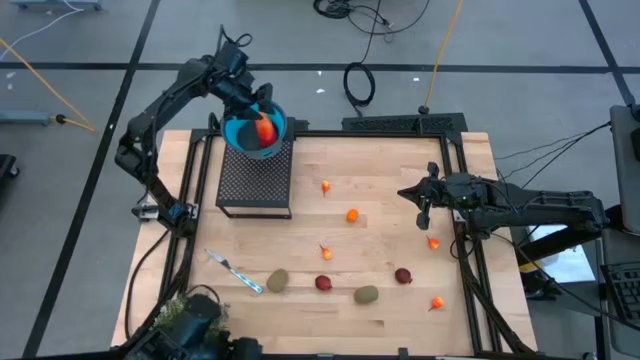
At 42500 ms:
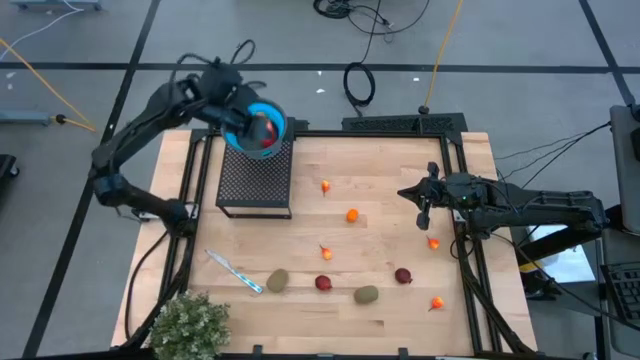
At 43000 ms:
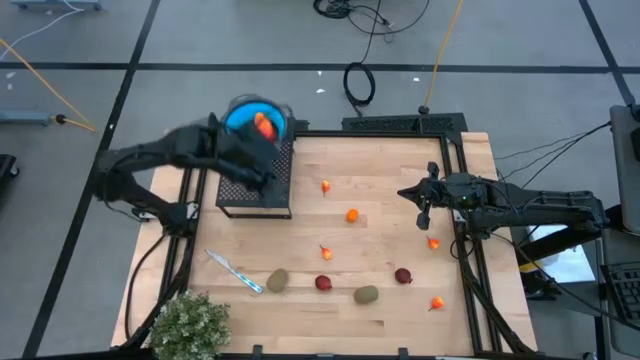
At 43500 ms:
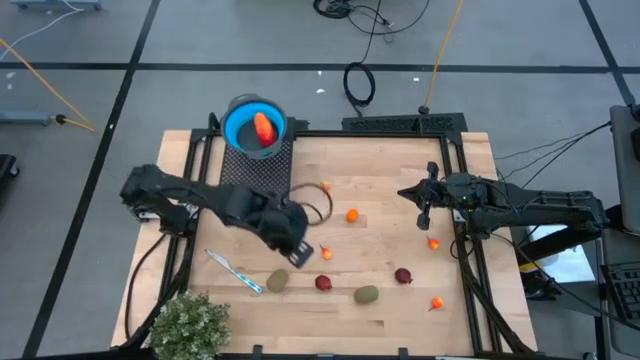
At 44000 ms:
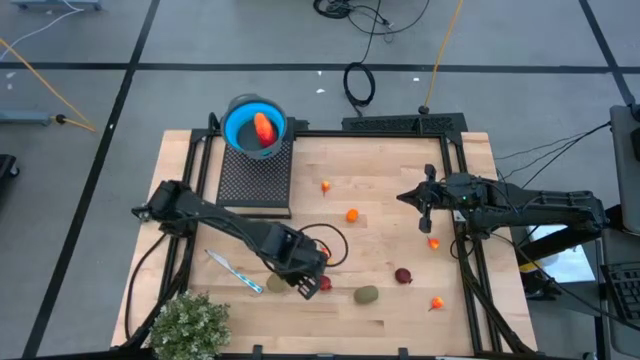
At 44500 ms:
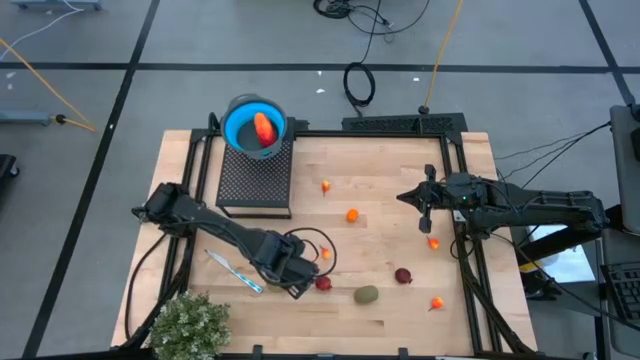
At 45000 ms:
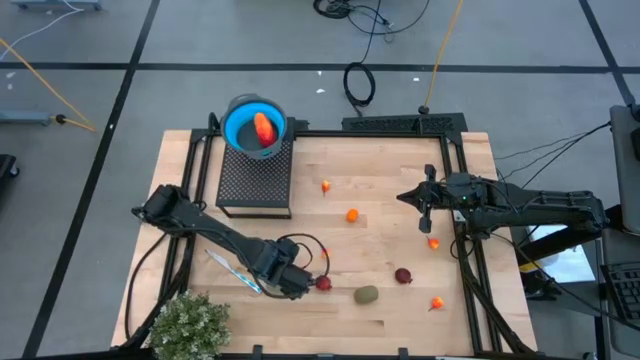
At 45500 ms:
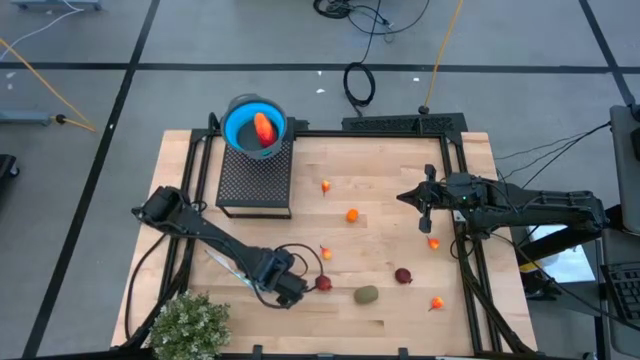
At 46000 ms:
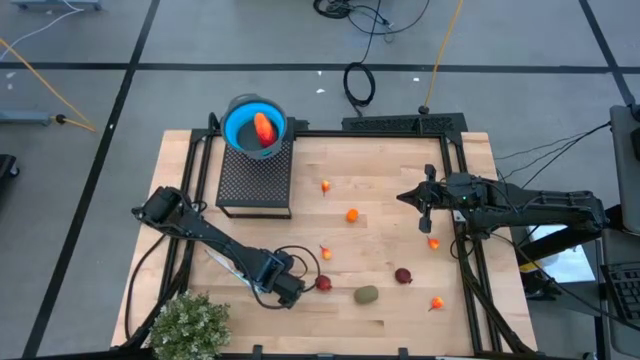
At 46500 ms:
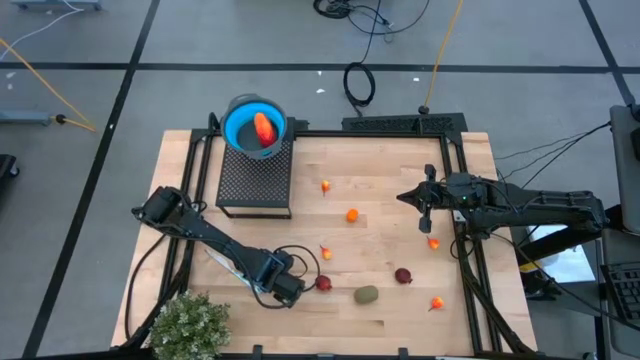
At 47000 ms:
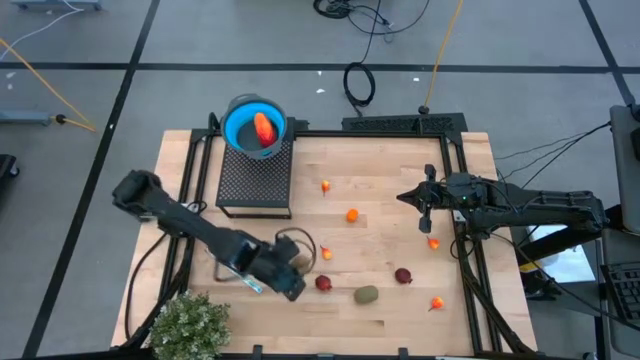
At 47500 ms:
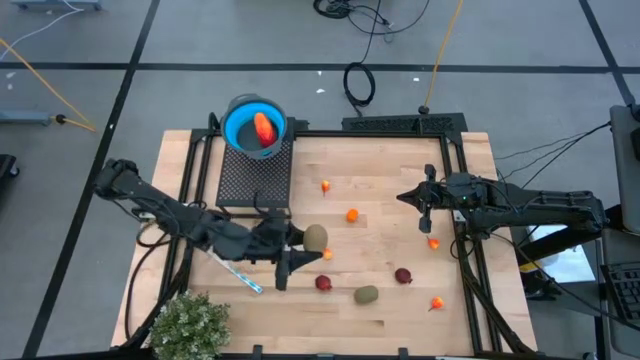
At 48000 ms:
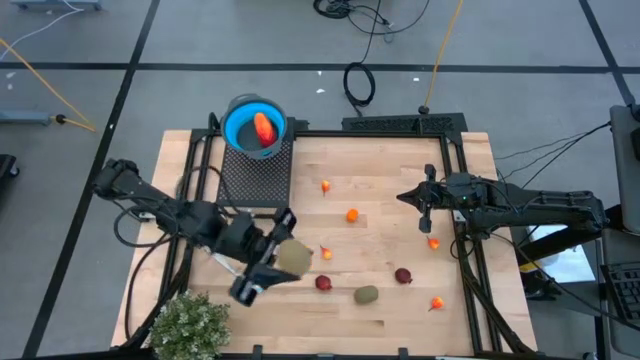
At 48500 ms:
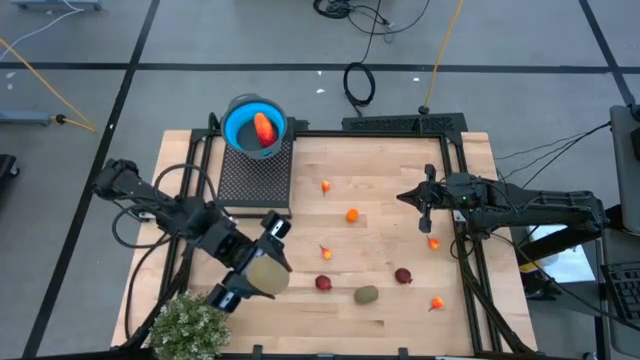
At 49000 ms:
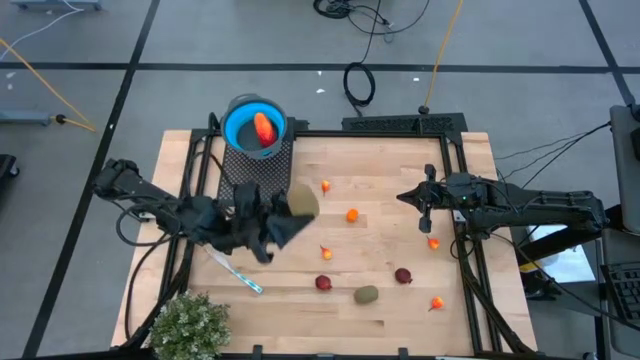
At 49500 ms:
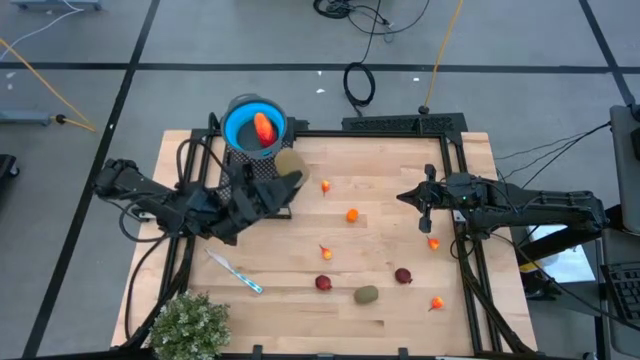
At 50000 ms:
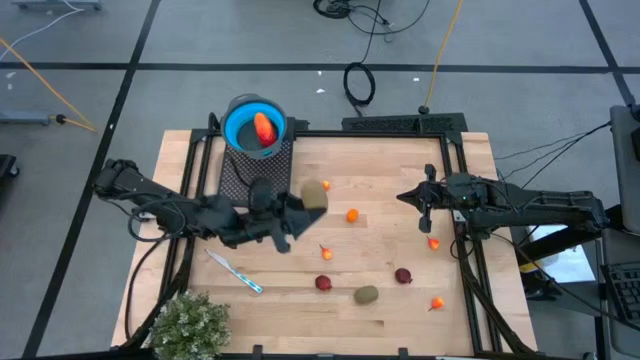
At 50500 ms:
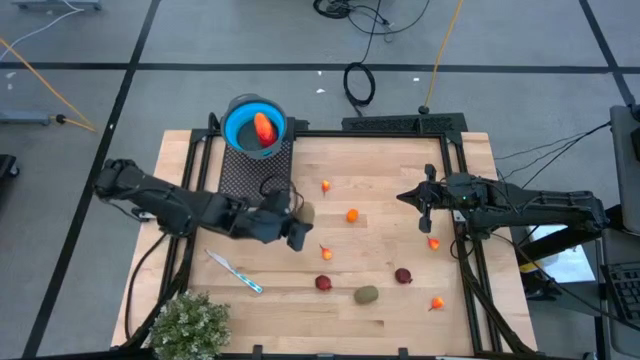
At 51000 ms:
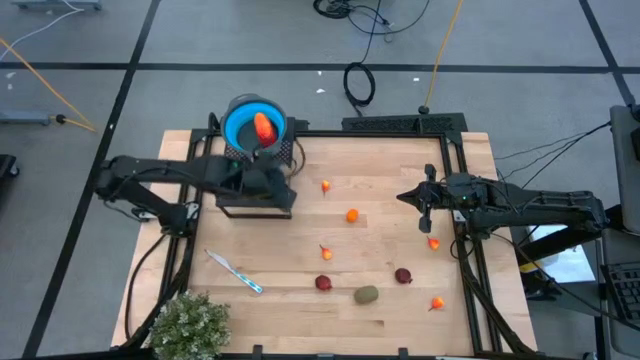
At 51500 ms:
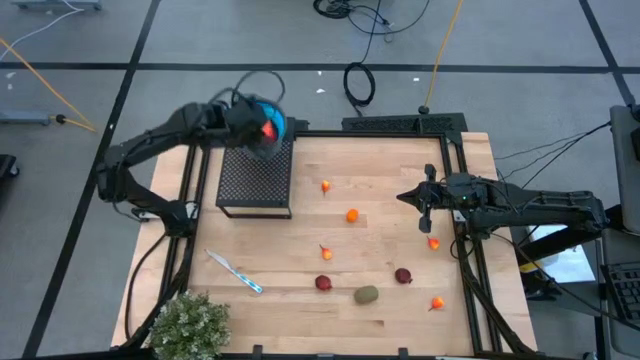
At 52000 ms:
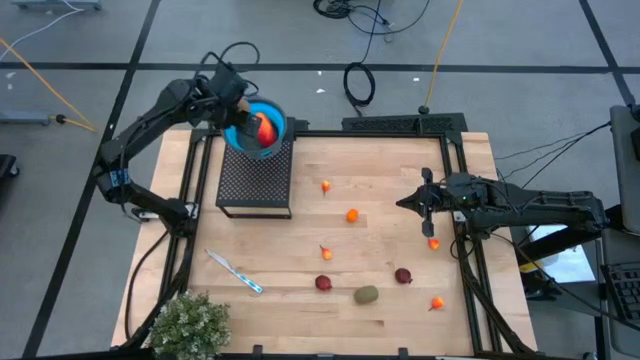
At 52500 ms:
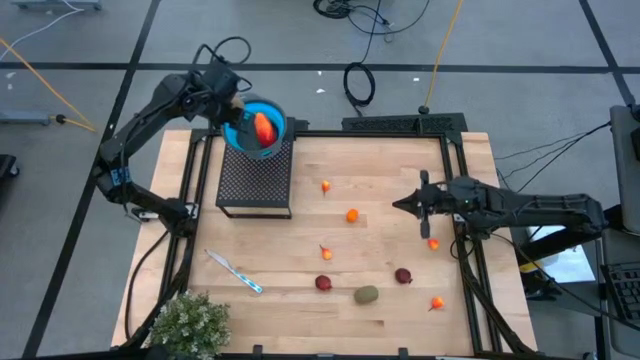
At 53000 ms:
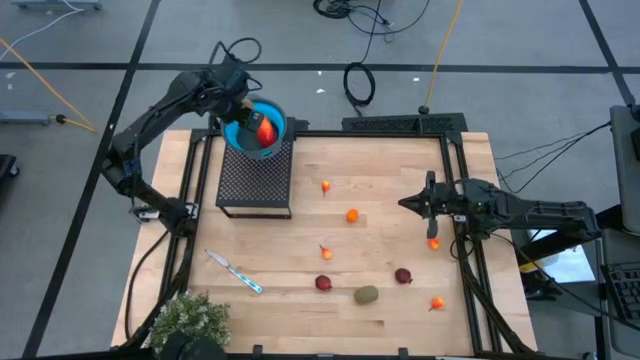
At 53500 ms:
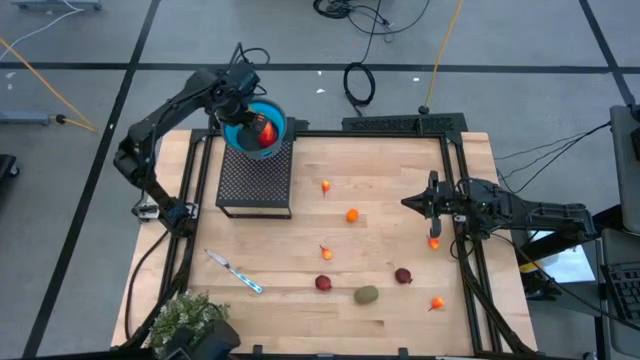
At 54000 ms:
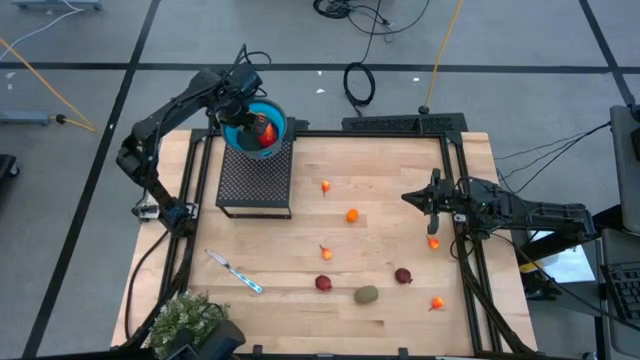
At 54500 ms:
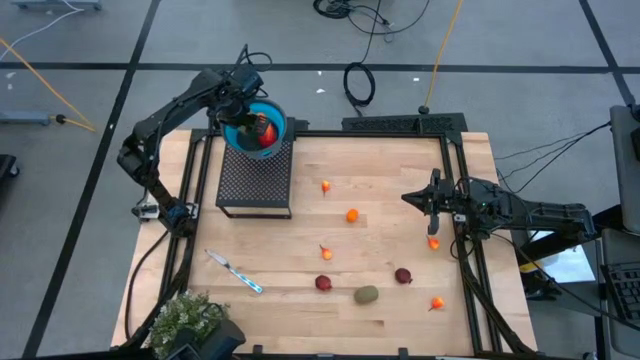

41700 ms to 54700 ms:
Task: Pick & Place Fruit
Put the kiwi into the blue strainer bowl on the shelf

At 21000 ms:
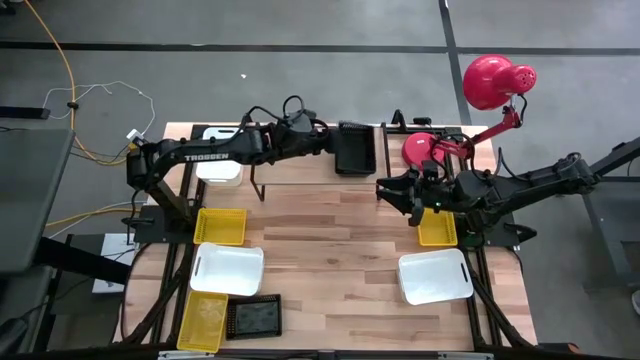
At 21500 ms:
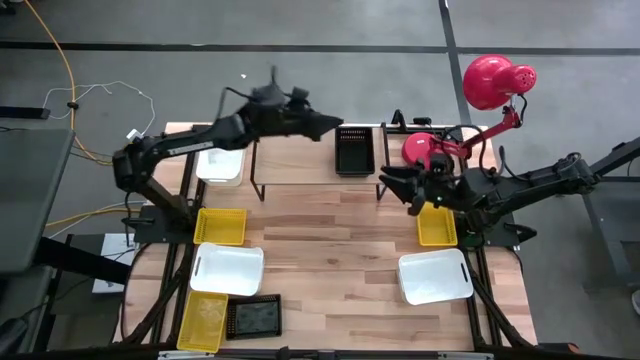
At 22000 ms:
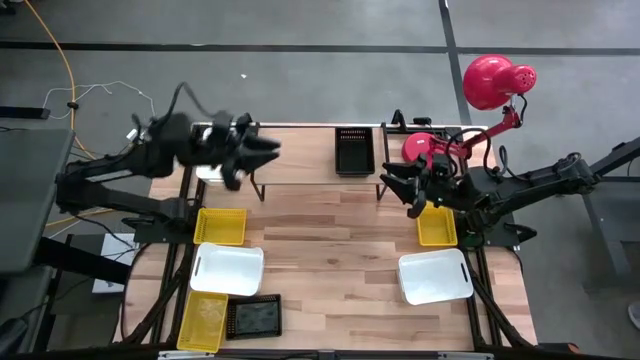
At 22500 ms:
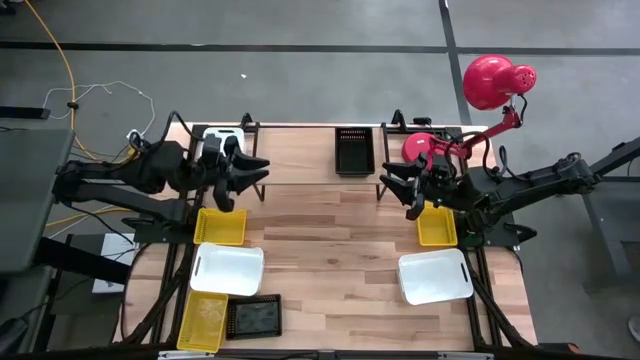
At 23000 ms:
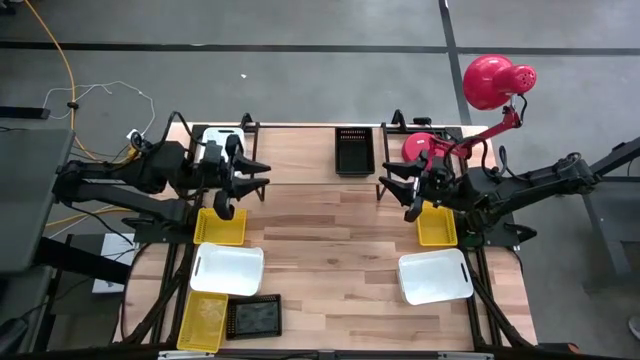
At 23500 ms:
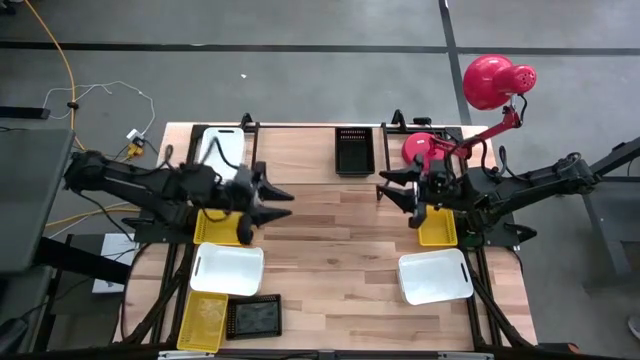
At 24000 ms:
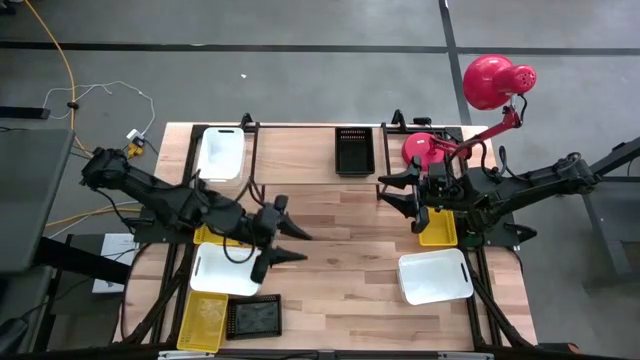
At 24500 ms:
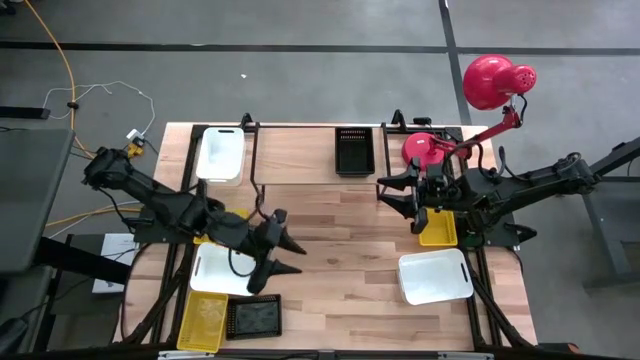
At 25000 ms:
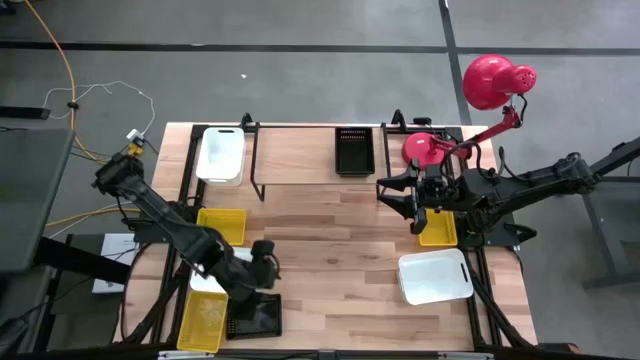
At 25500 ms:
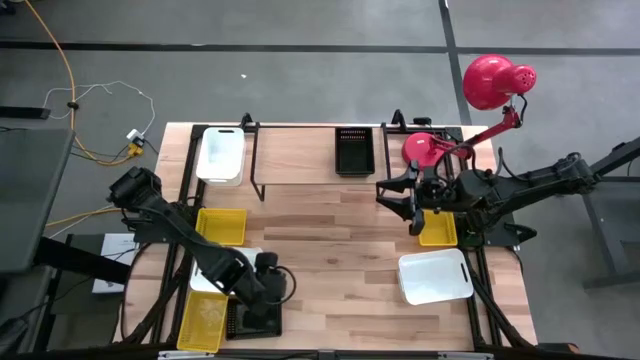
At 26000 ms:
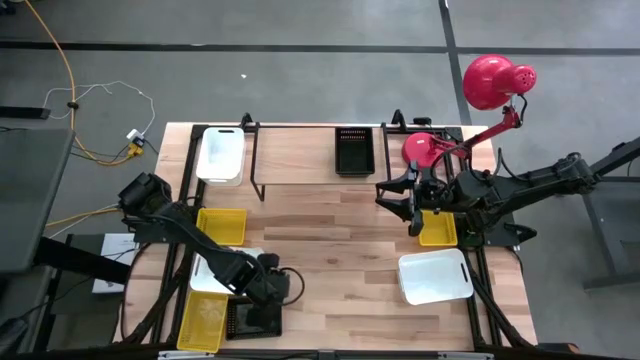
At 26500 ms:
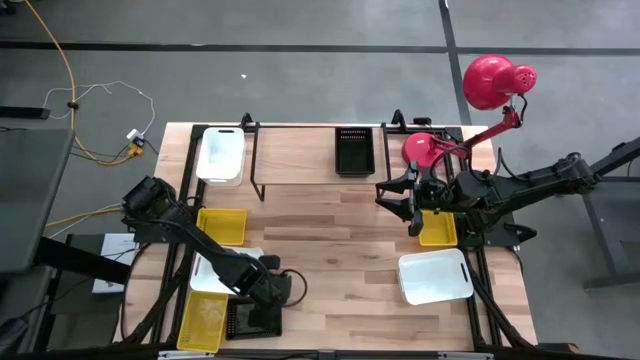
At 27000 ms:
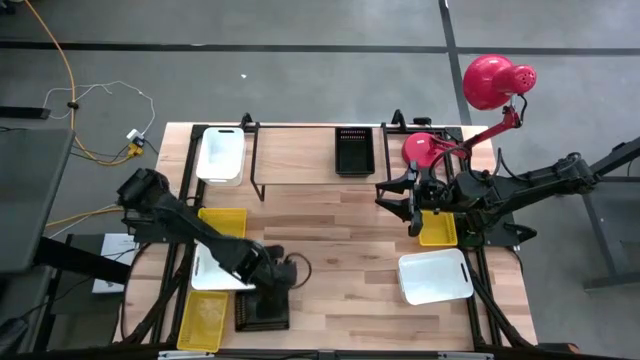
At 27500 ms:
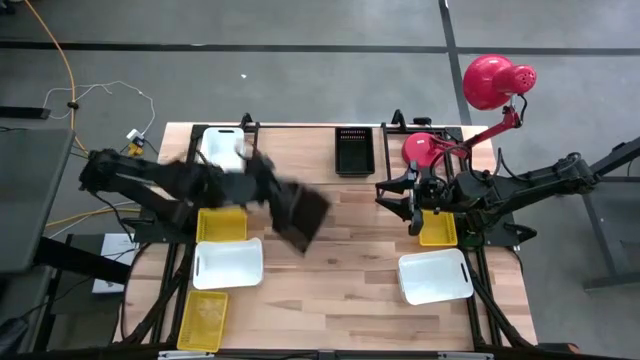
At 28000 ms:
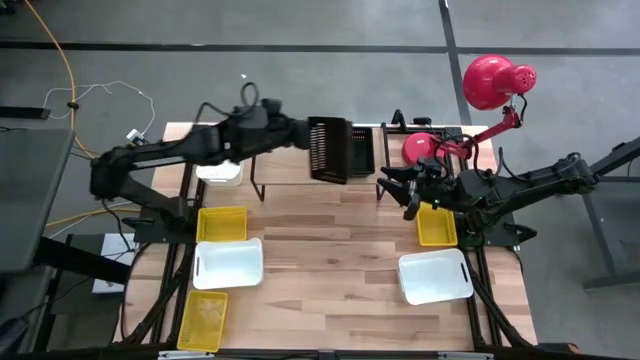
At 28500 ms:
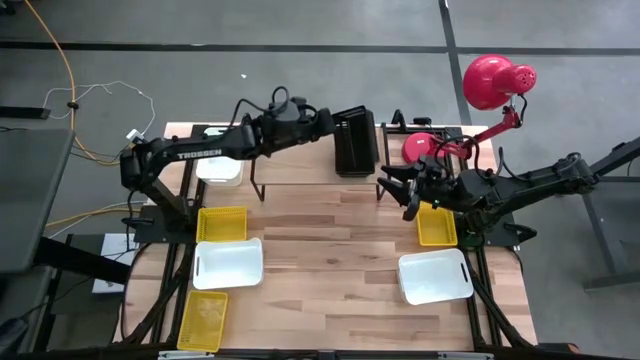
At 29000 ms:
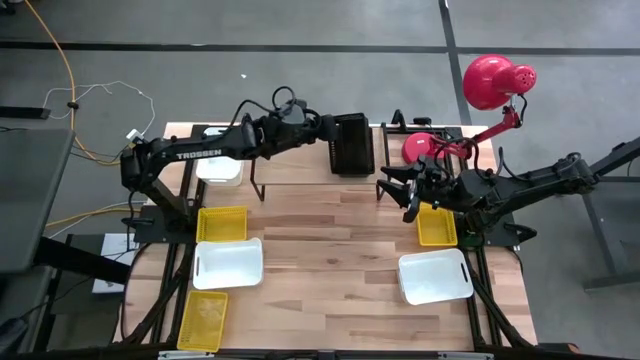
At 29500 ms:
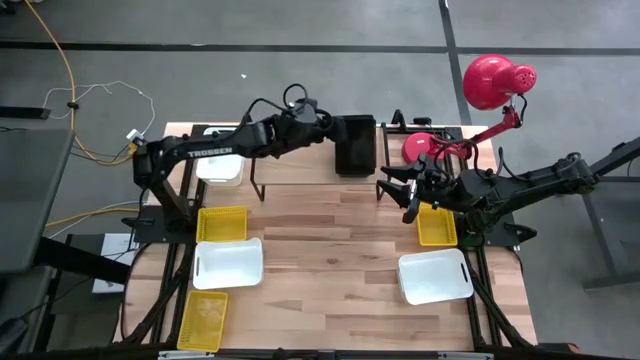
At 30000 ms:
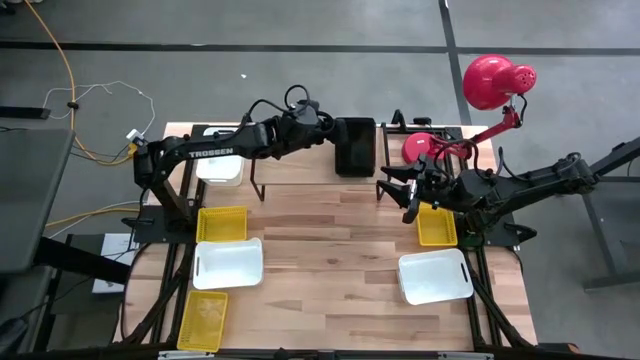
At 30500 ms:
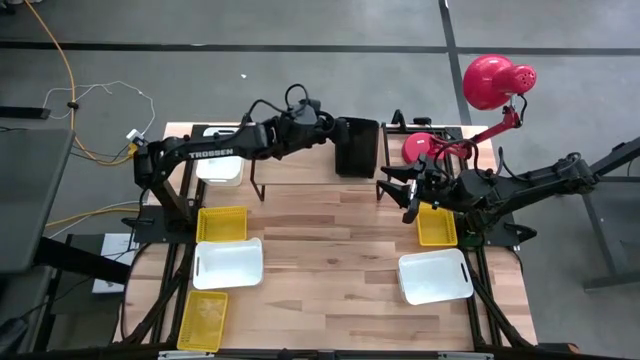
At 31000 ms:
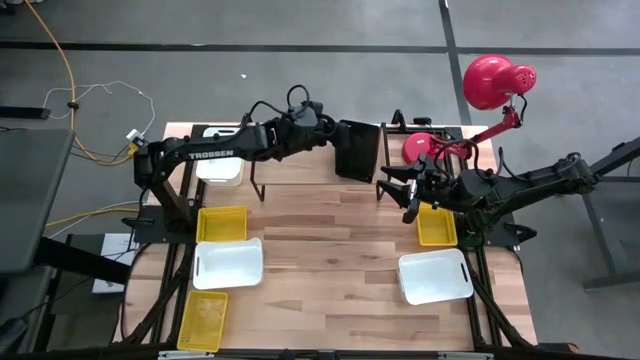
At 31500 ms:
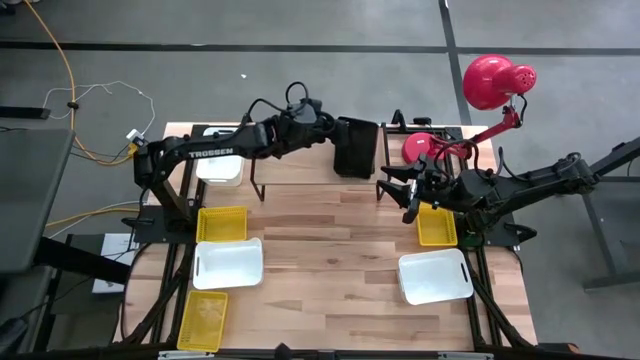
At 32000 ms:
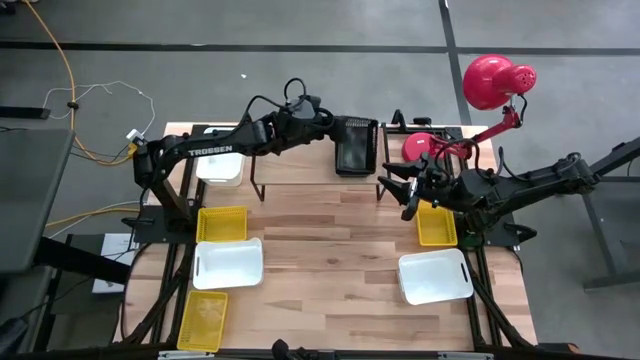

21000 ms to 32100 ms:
Task: Stack baskets on shelf by color
Stack the black bin into the black bin on the shelf
